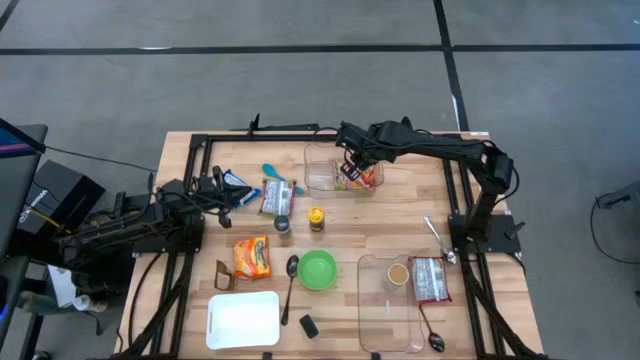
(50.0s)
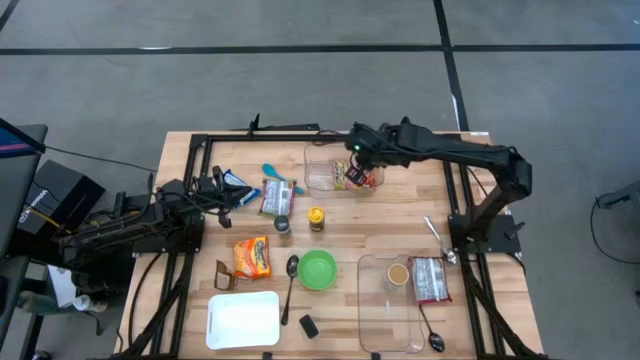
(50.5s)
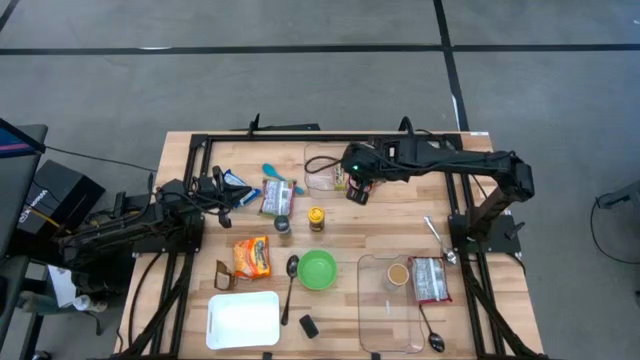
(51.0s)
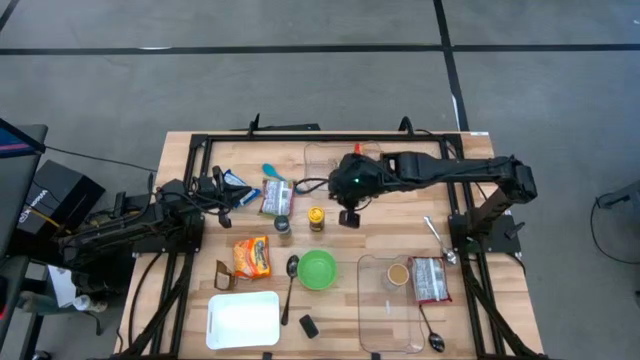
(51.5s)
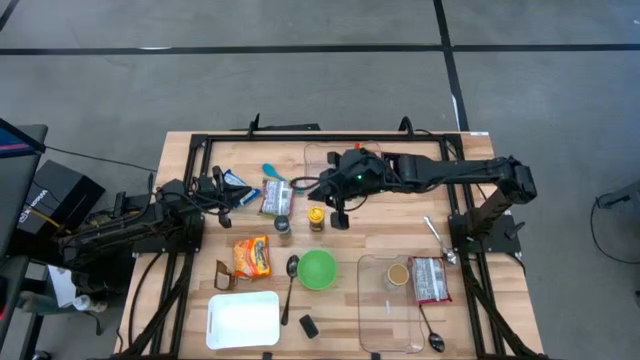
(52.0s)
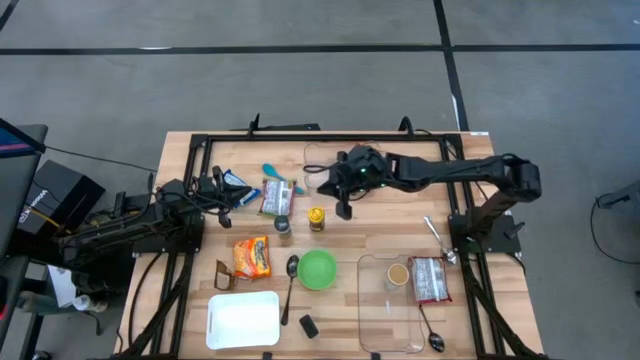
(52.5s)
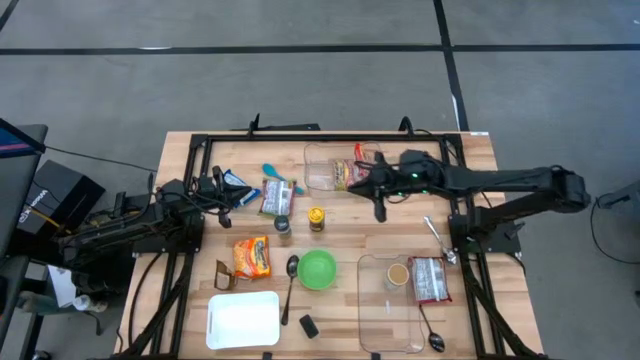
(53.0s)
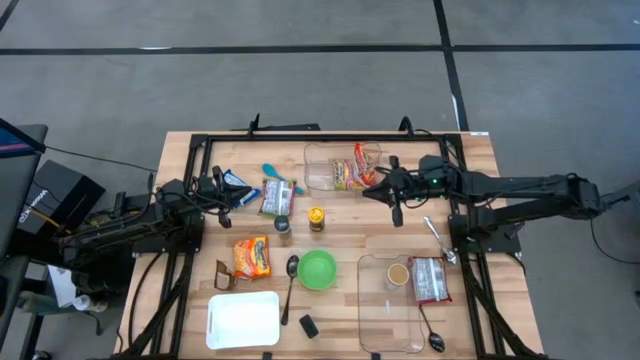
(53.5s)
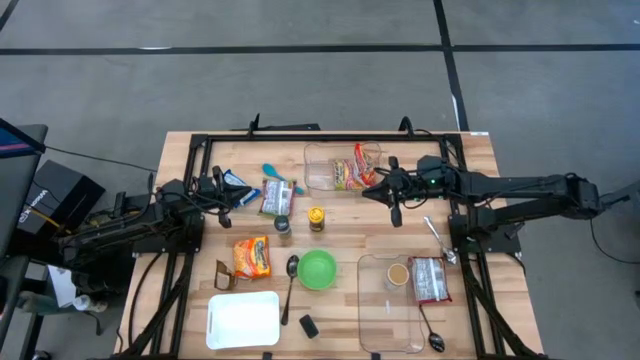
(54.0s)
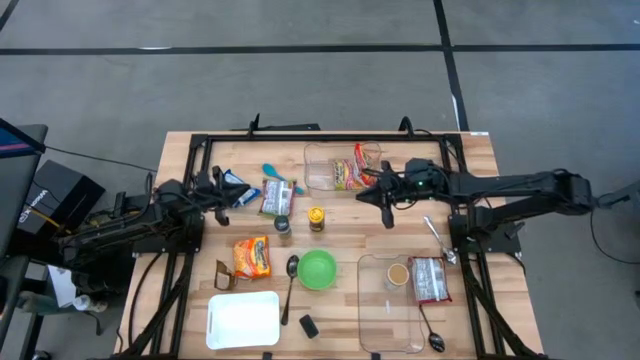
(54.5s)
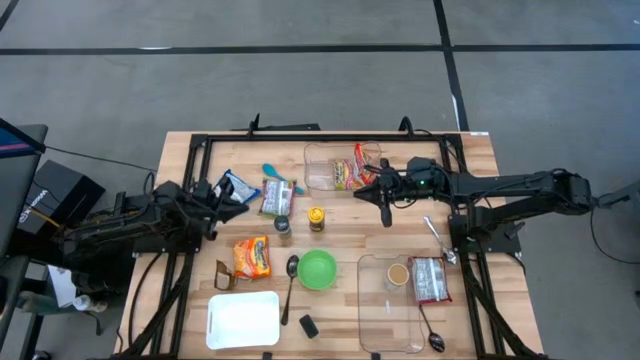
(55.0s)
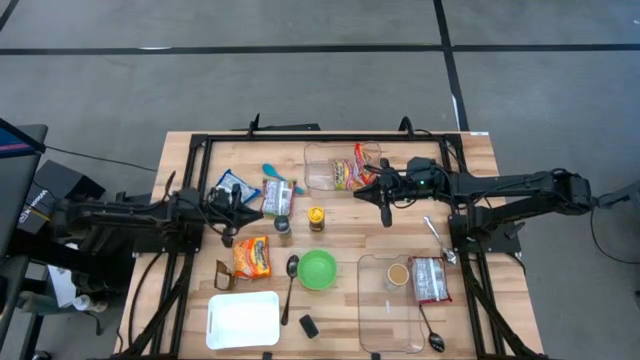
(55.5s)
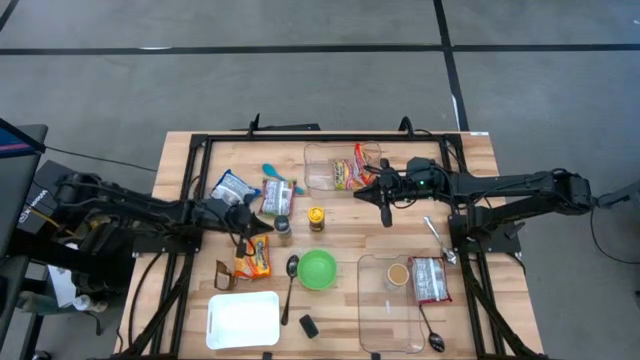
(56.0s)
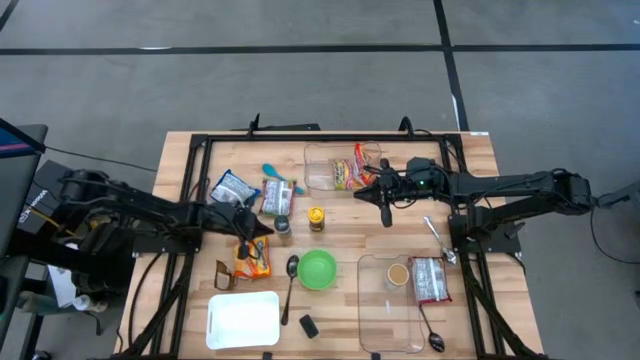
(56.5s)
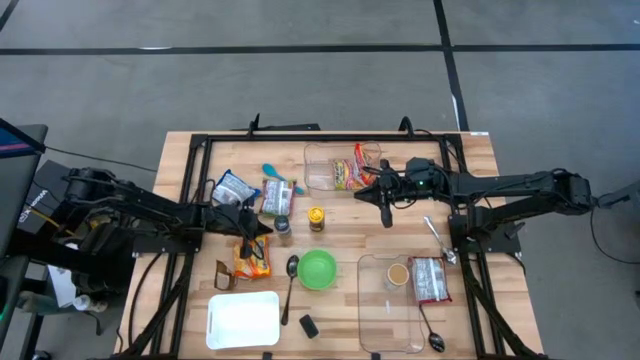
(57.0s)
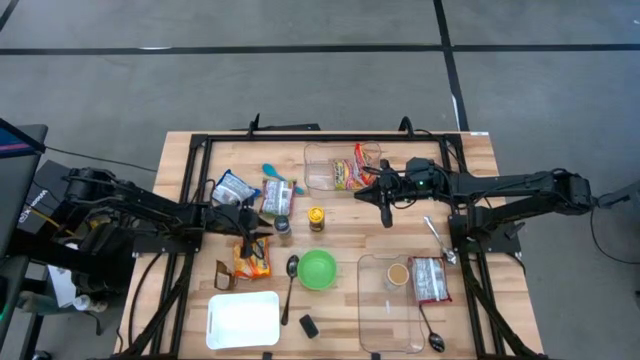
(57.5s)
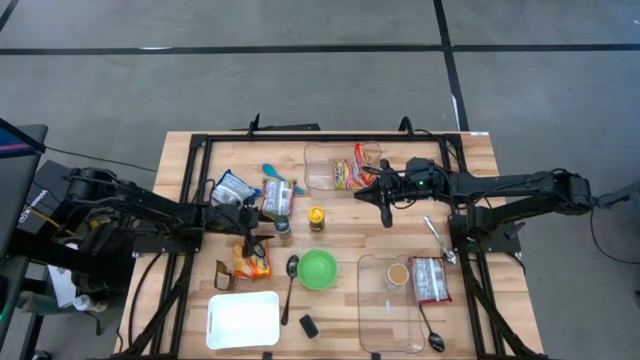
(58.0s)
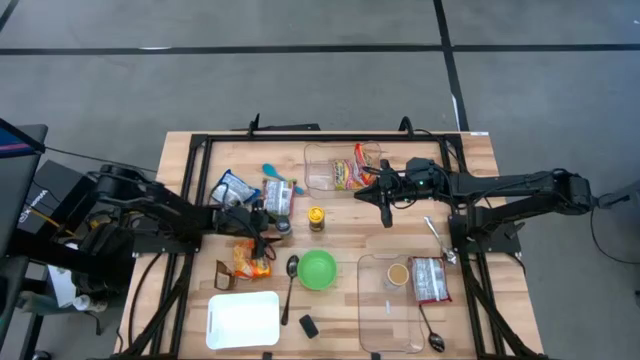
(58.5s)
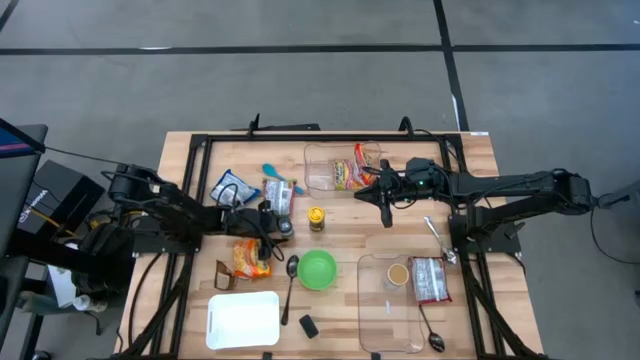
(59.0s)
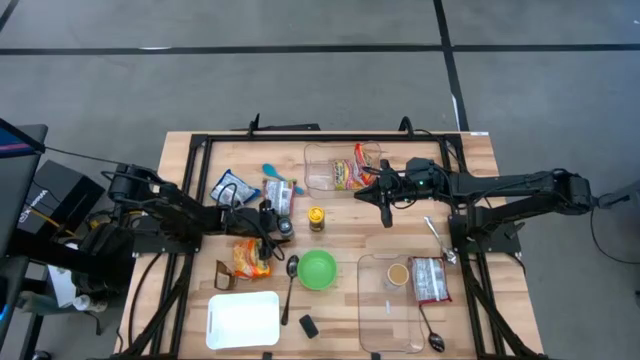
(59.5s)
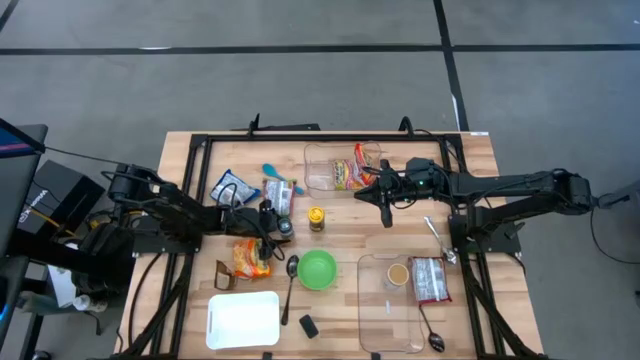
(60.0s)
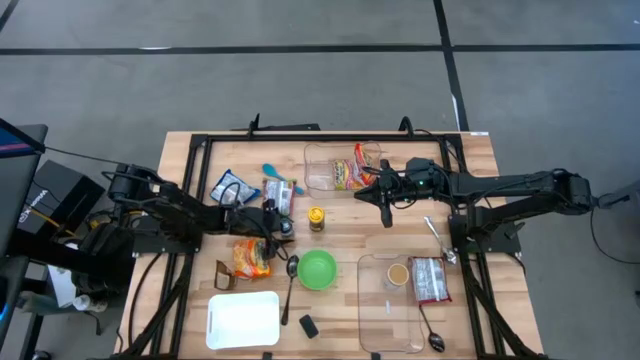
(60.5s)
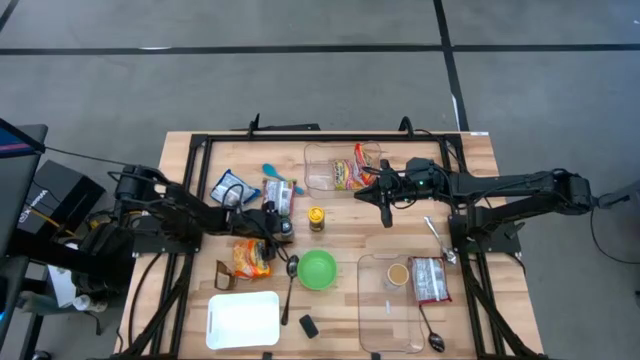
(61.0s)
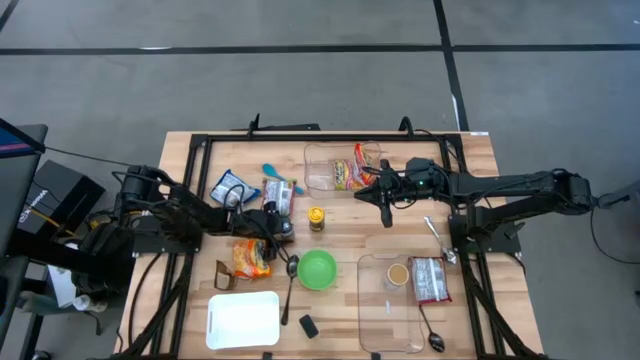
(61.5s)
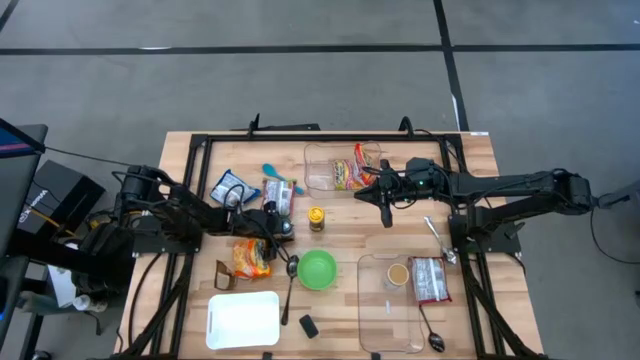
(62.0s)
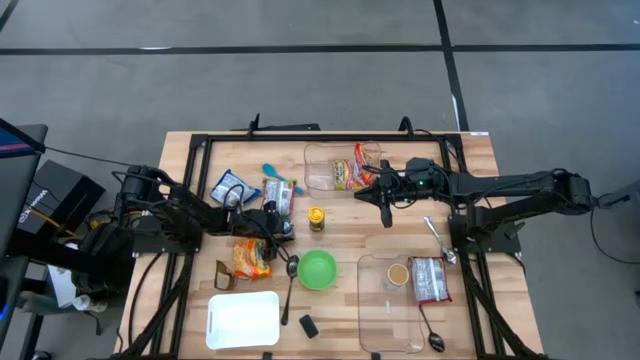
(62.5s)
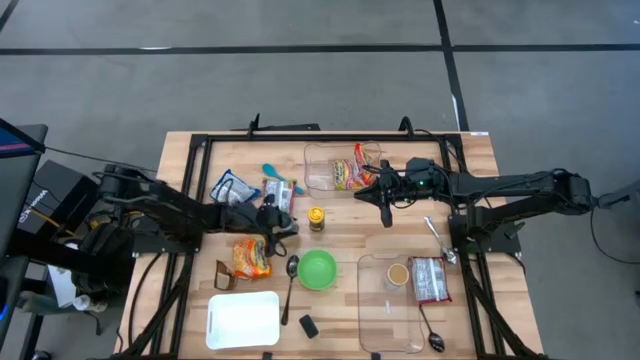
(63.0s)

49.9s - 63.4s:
Task: Pick & Place Food Item
Put the brown and blue seasoning into the bottom transparent bin

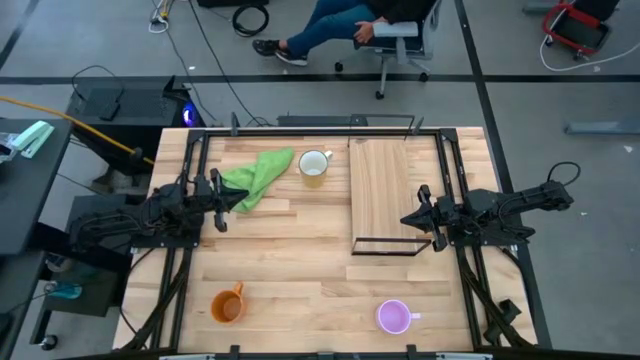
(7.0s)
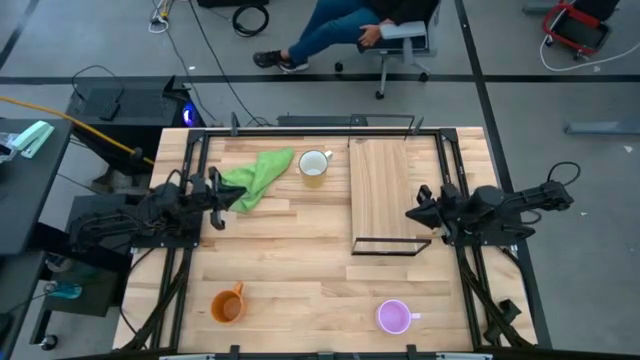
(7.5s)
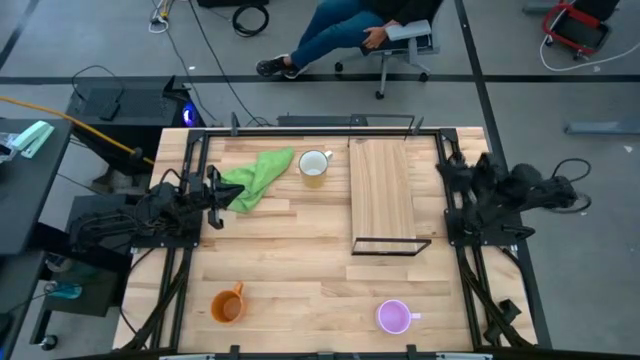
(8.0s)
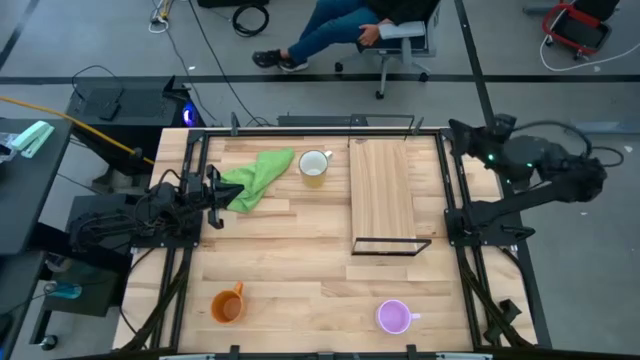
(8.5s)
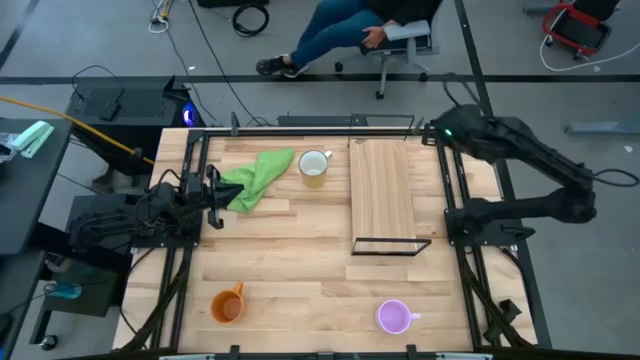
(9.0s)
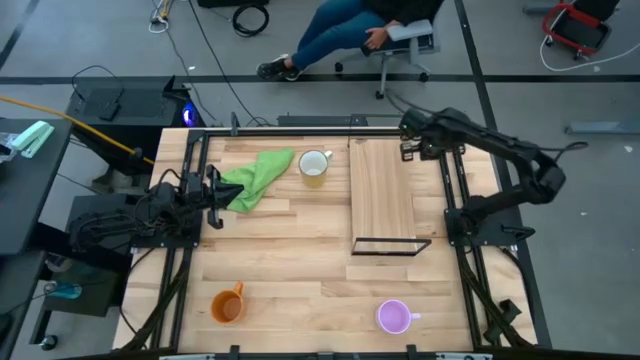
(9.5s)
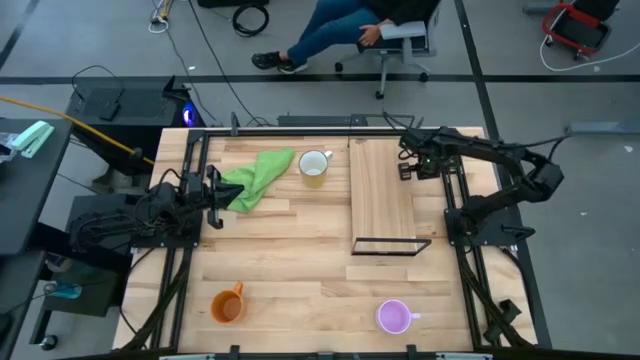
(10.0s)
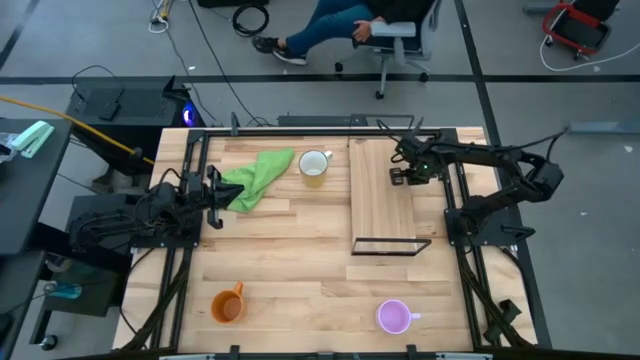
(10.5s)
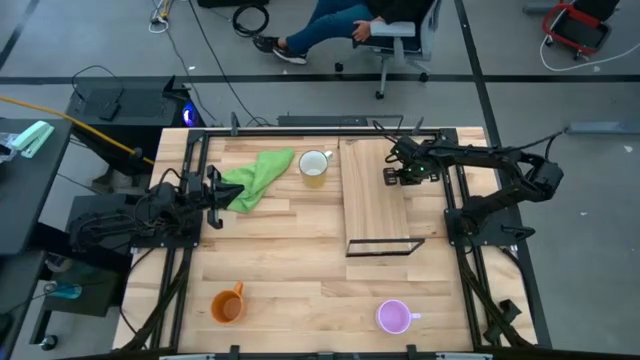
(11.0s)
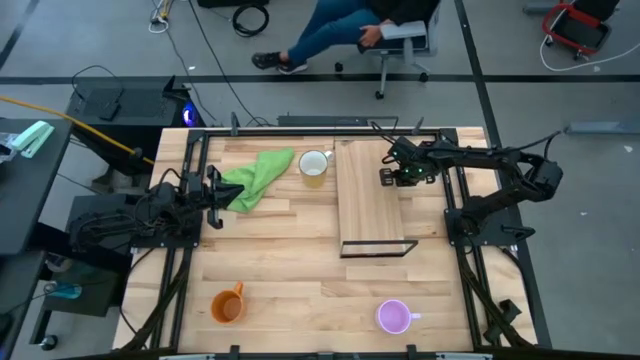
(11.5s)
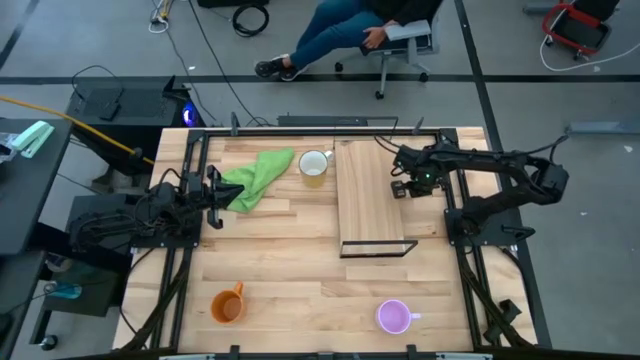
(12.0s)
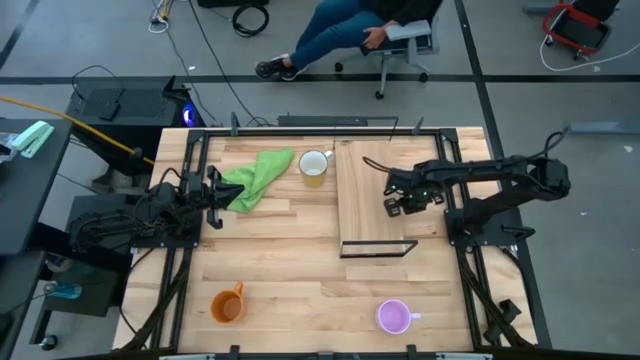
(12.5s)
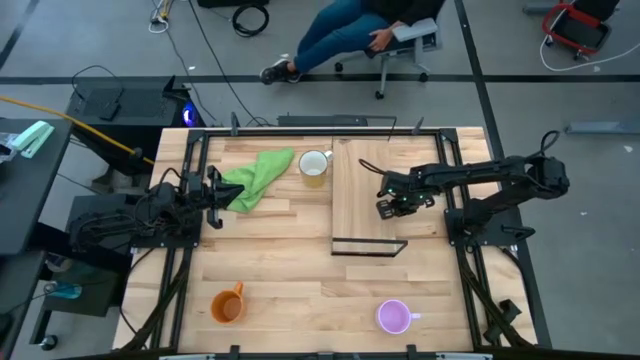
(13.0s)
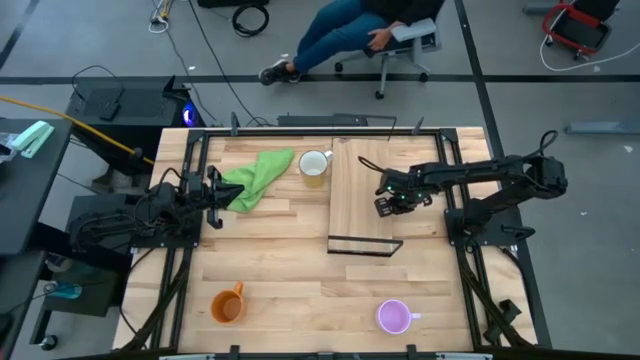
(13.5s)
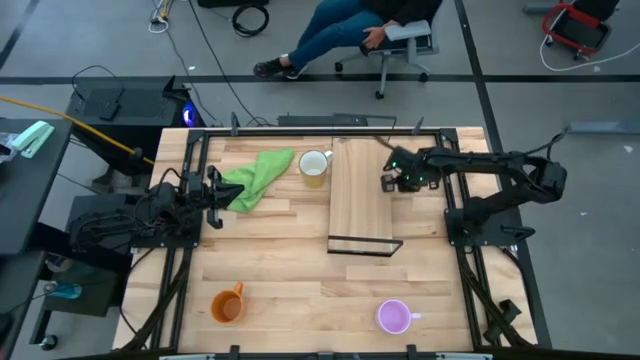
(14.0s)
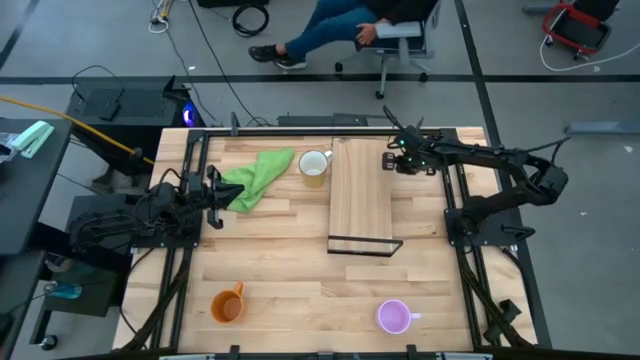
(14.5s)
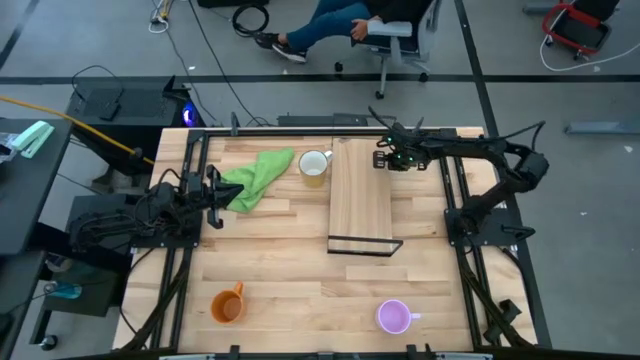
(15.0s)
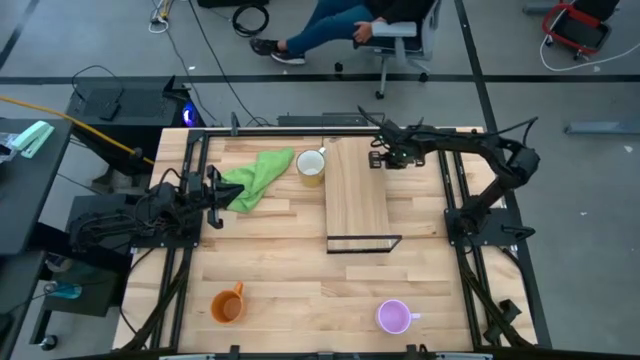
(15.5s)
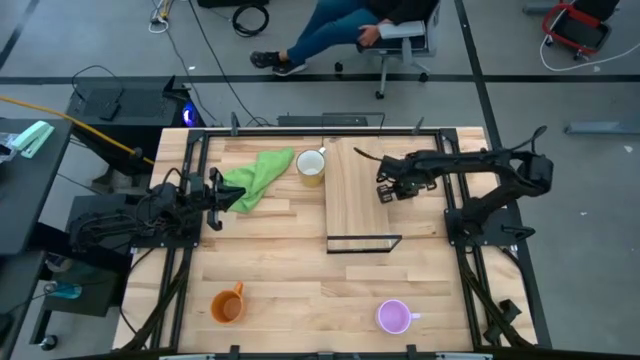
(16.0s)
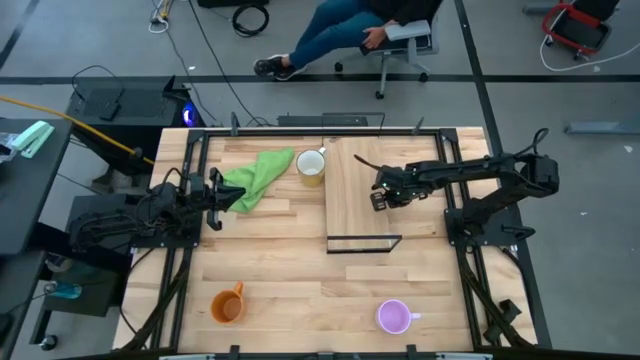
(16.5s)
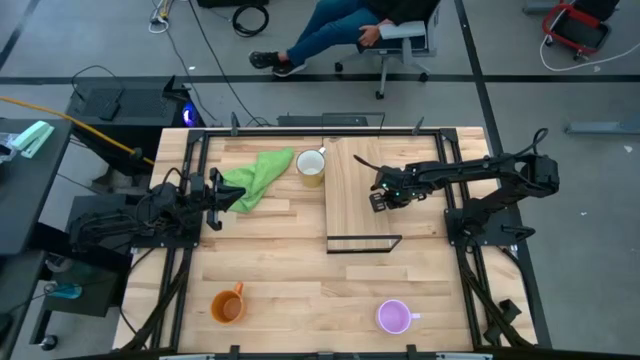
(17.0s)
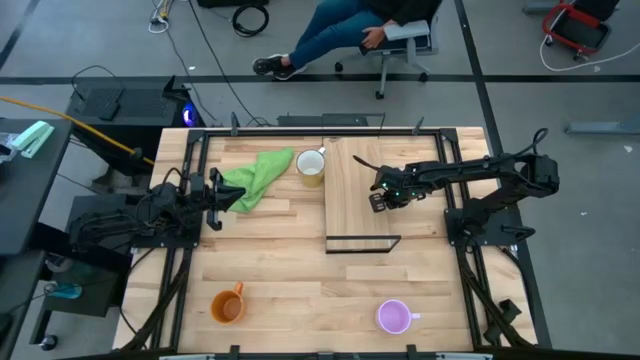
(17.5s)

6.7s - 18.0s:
Task: Stack small to large cups/mugs on shelf
Adjust the shelf
